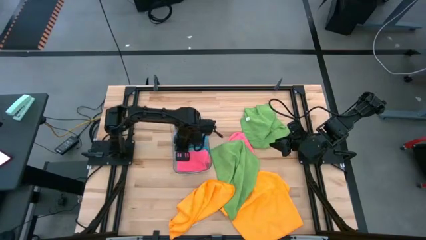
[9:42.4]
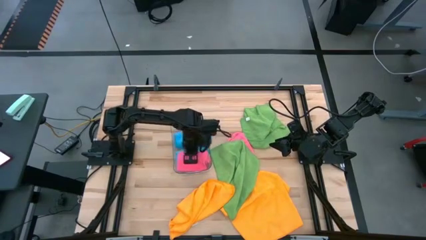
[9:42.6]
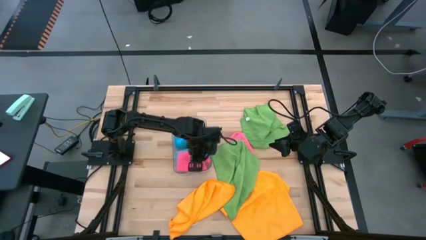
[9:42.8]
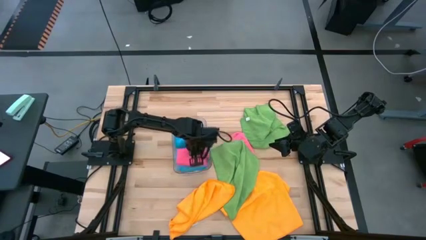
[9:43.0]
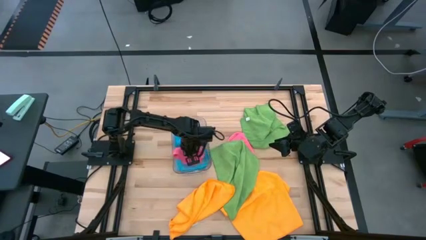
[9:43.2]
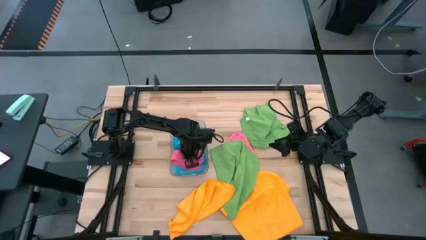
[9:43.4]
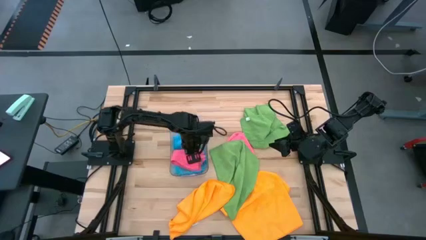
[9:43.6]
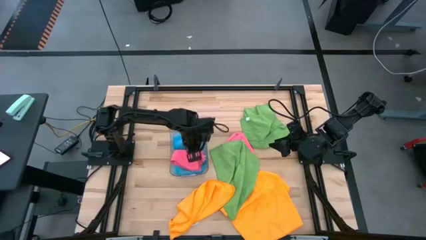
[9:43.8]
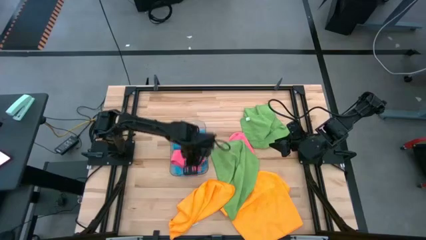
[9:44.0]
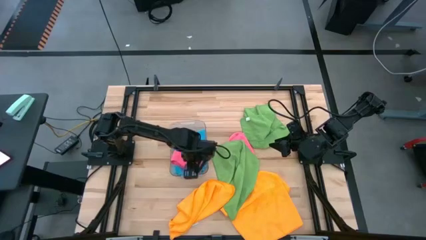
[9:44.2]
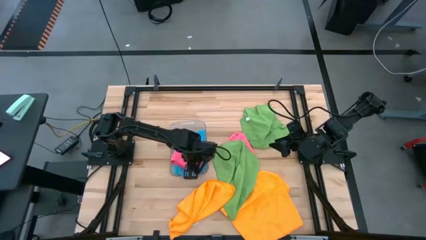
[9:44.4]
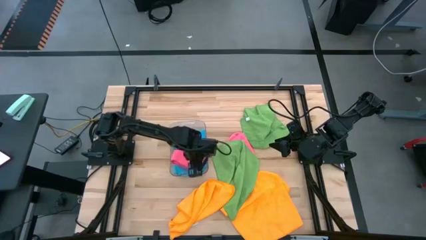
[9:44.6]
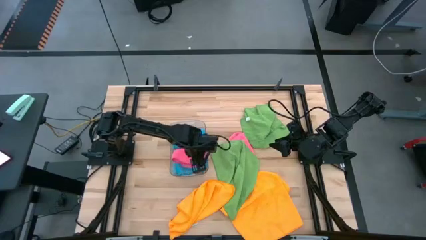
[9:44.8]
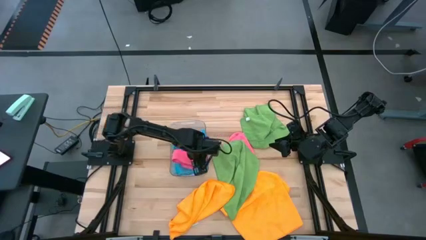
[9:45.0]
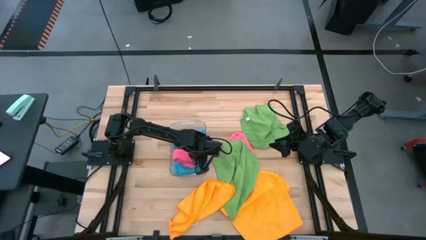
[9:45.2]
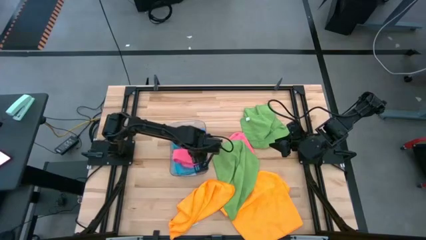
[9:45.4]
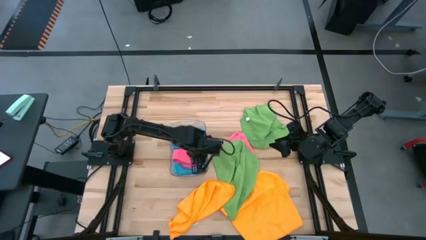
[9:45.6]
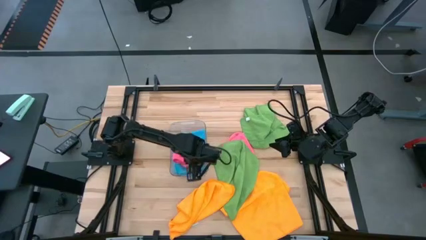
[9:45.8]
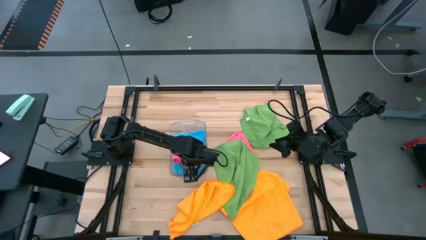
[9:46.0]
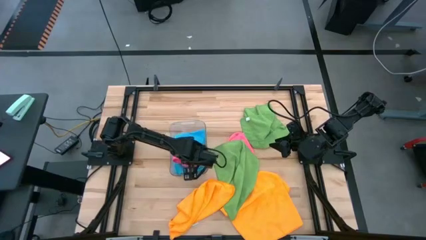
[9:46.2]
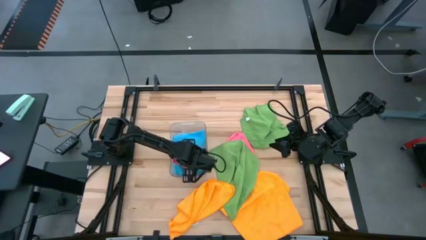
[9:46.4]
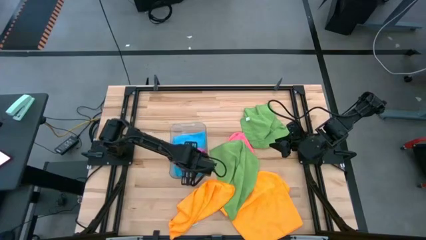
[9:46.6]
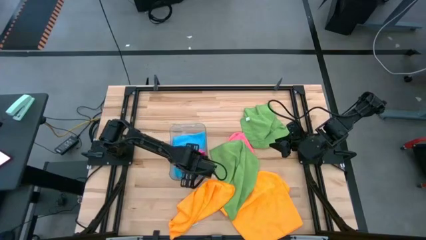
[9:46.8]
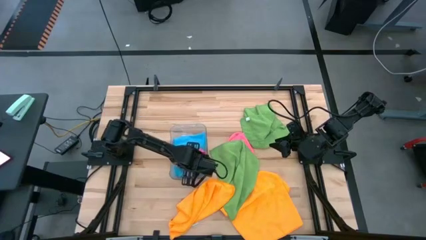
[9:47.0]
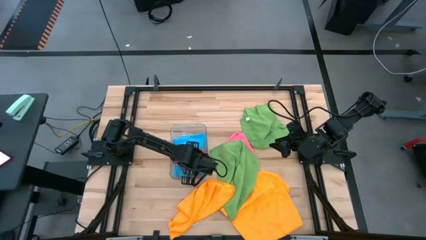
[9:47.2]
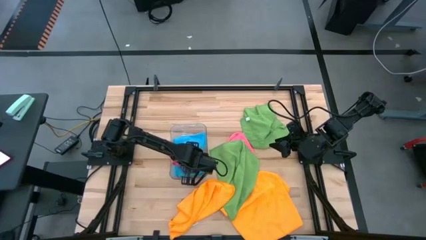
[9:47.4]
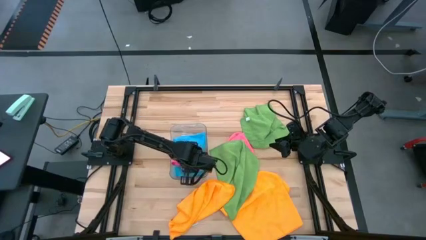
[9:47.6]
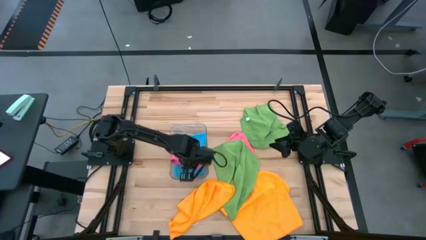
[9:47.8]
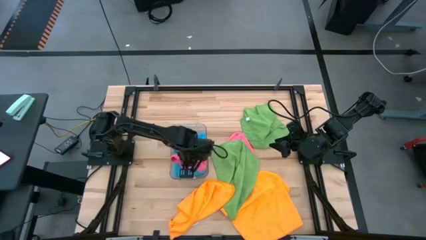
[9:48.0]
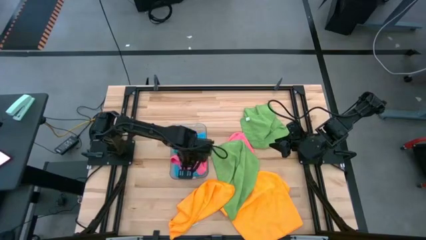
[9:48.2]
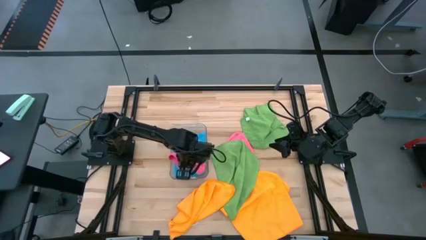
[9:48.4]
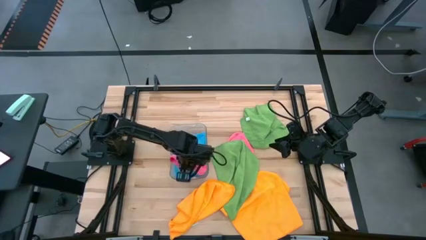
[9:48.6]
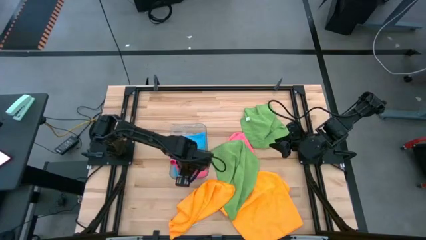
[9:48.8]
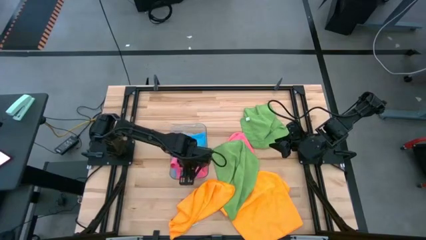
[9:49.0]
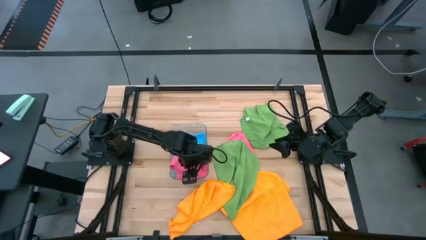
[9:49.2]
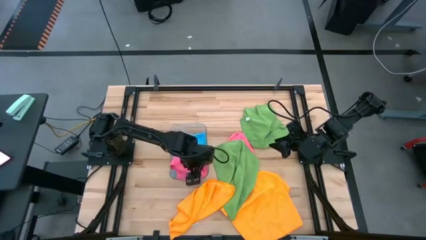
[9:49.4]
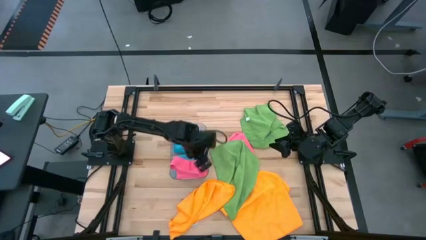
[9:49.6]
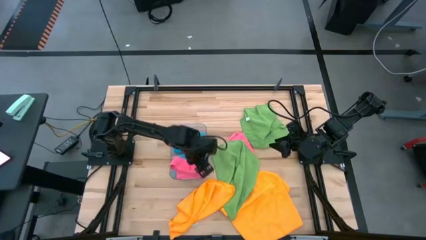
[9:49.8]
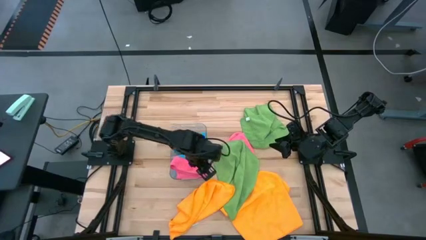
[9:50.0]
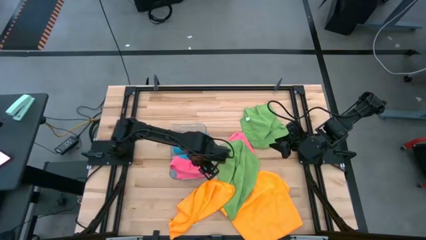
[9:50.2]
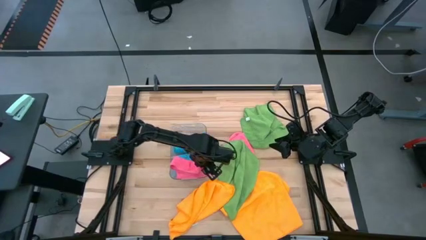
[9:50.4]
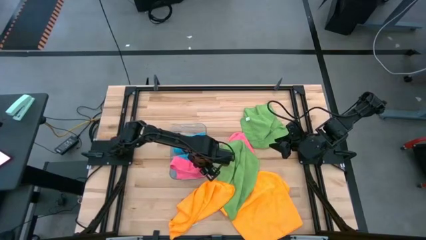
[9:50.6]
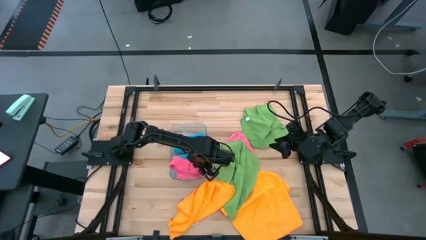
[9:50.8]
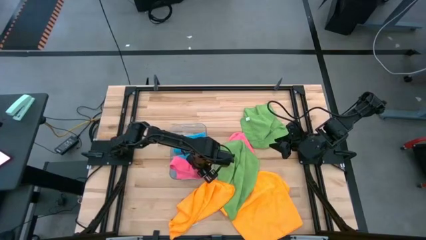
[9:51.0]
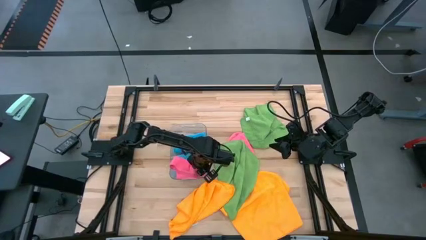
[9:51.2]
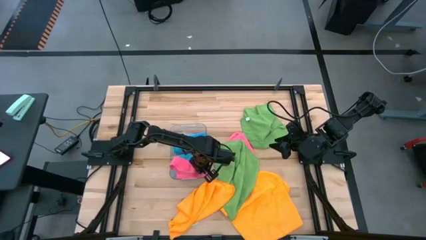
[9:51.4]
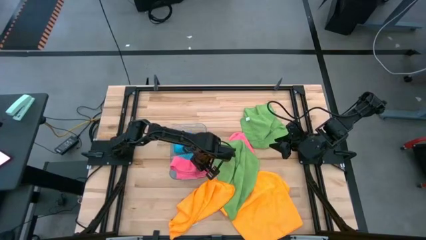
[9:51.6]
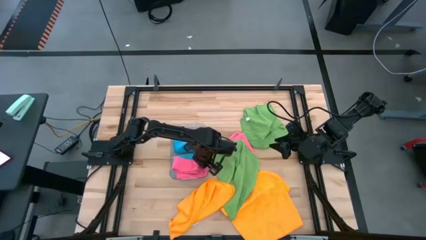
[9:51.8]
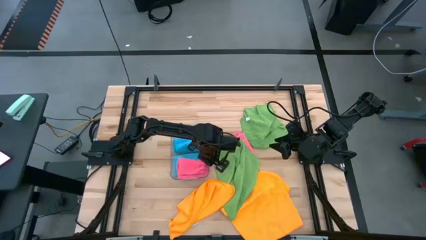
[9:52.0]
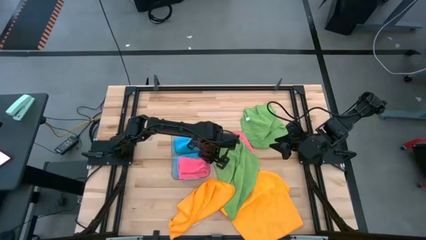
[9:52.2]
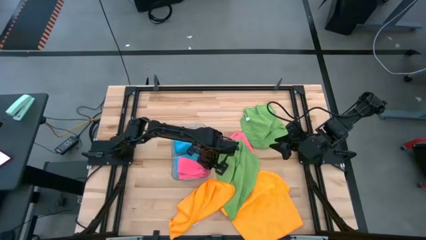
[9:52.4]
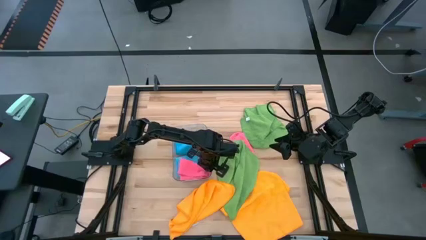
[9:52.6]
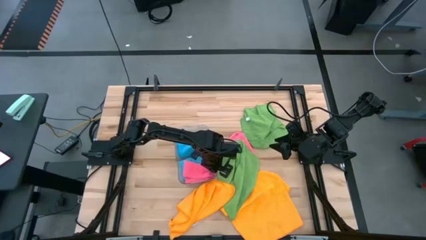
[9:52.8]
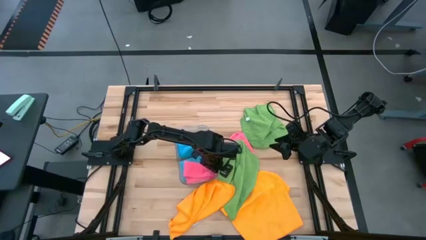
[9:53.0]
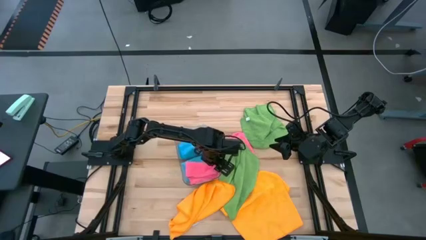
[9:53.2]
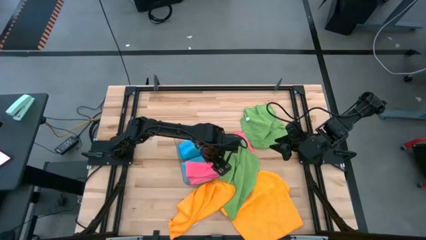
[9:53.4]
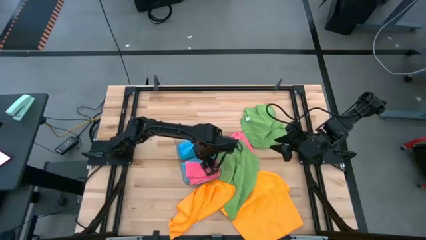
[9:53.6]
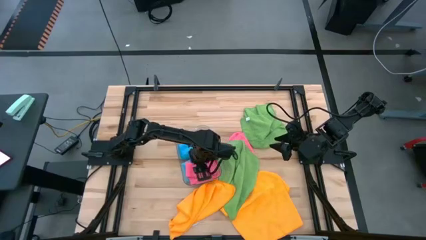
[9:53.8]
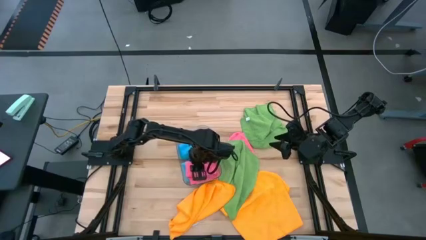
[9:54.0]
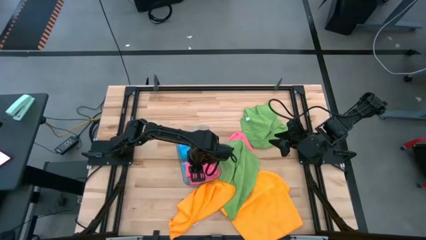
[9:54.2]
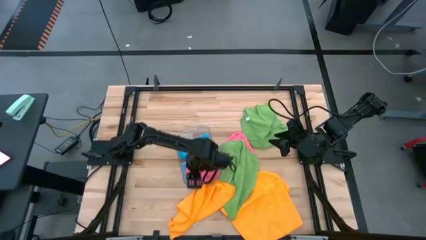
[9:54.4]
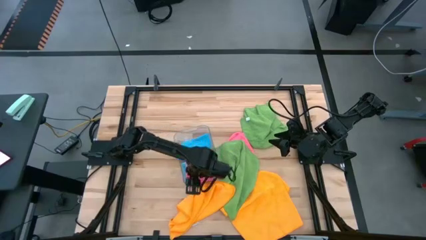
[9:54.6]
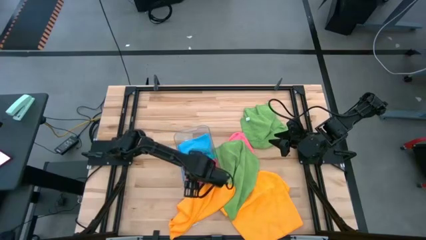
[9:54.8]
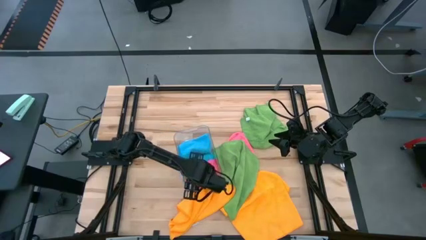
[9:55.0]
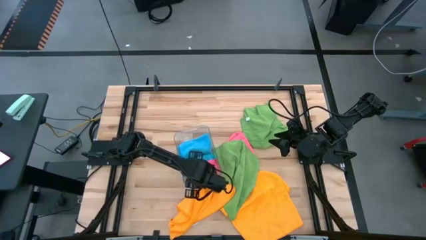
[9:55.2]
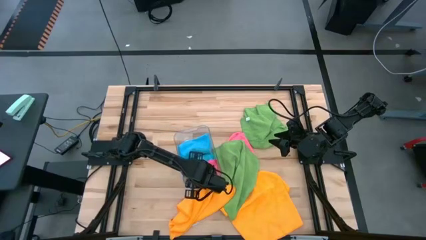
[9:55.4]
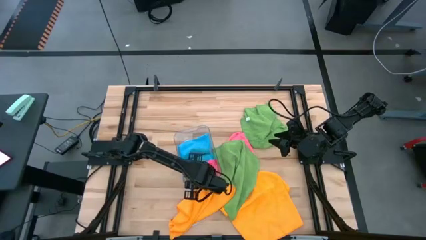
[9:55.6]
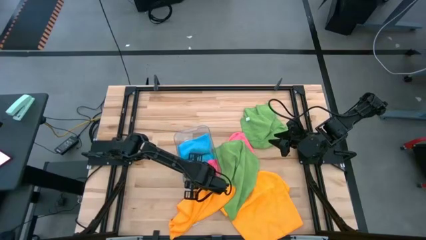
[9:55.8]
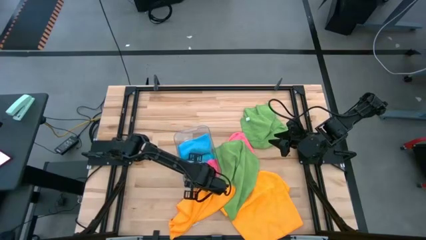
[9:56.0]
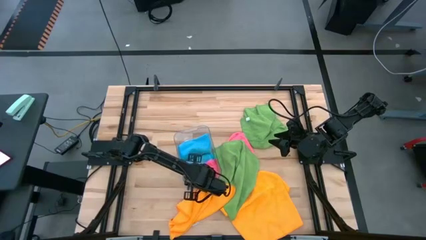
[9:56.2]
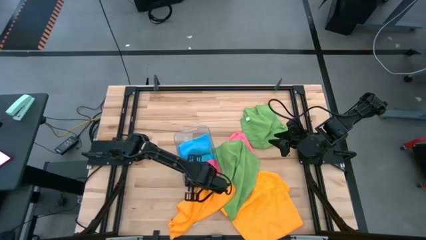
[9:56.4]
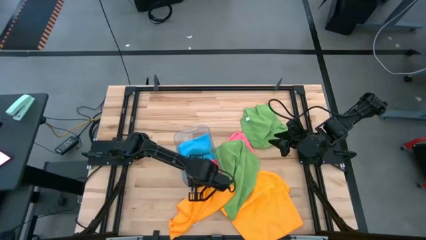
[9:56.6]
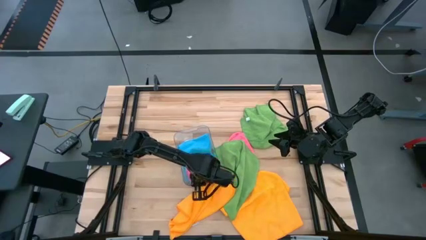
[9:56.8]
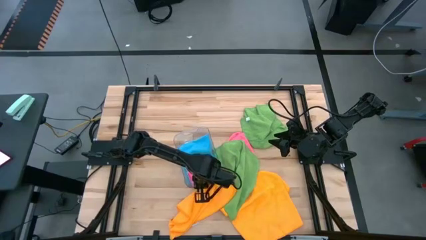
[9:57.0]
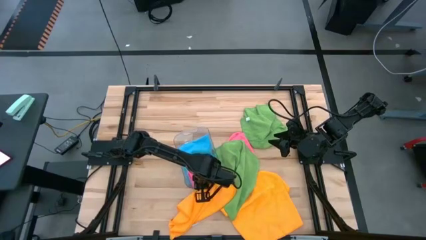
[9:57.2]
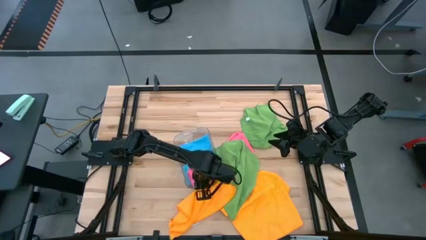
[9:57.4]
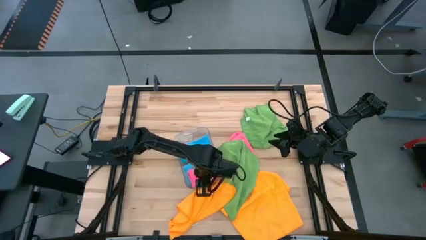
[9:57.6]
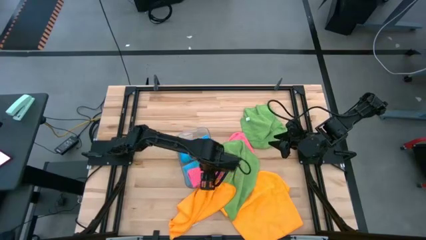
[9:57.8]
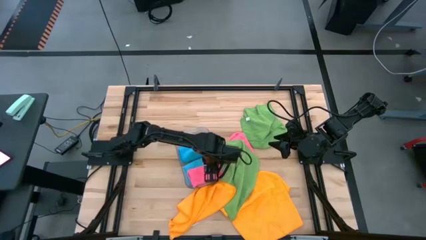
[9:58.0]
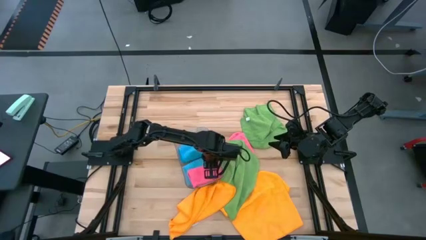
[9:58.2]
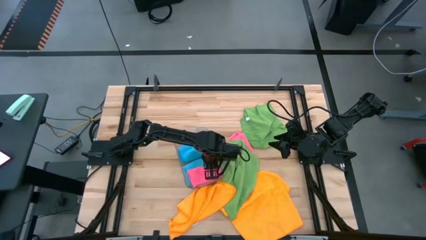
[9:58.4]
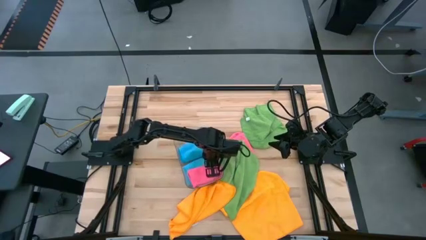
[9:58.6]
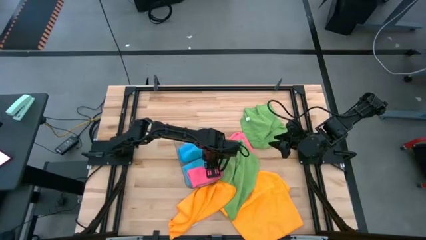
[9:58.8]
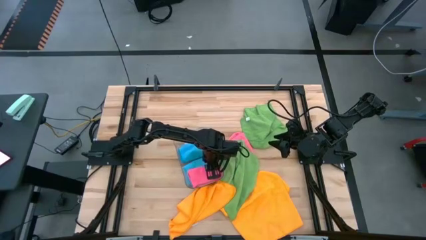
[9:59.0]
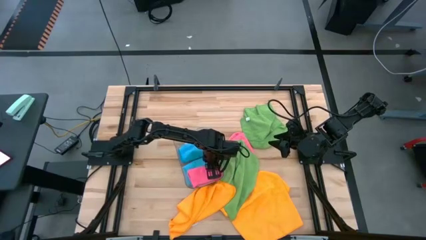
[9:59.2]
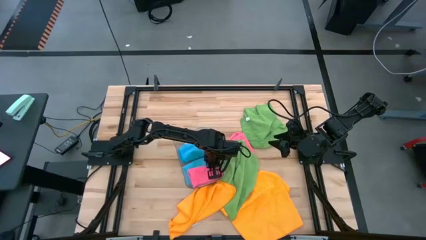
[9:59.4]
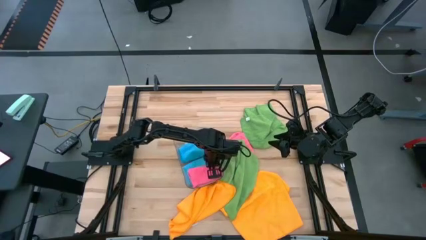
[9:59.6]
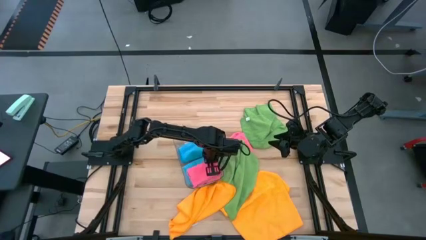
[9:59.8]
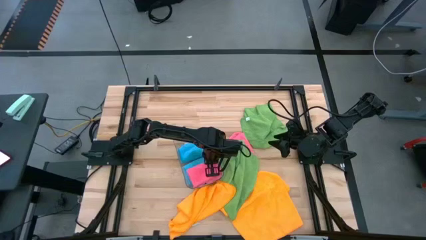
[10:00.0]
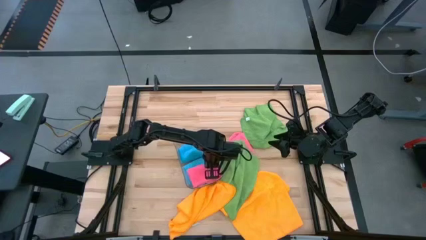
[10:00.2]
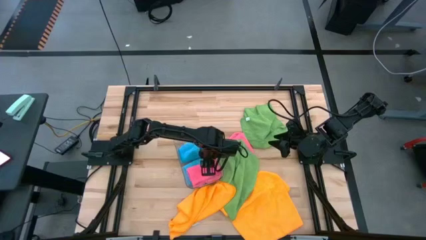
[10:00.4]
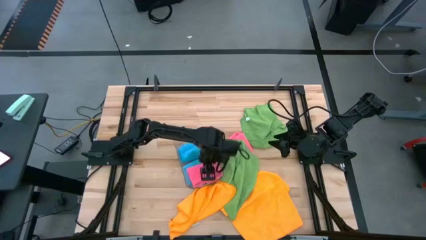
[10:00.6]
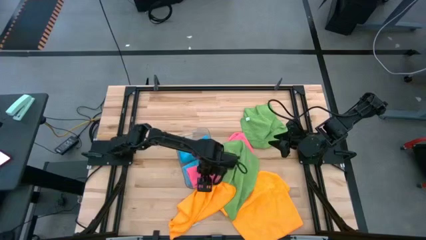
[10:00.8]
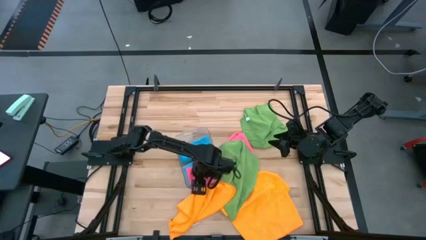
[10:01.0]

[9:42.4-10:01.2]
Task: Fold microfiber towels
Put the top pink towel into the transparent bin
